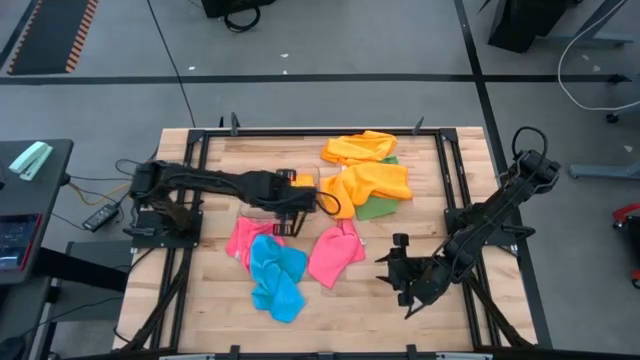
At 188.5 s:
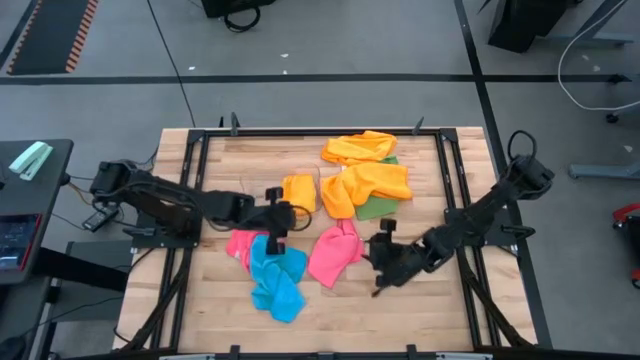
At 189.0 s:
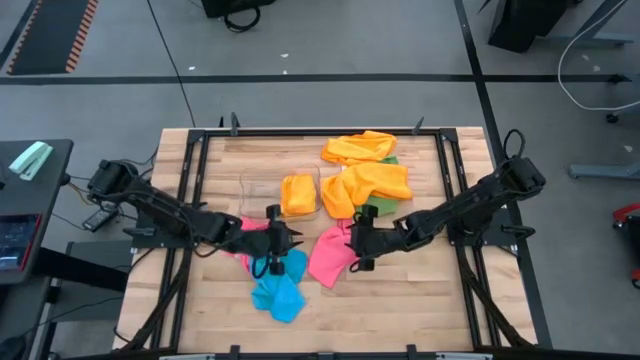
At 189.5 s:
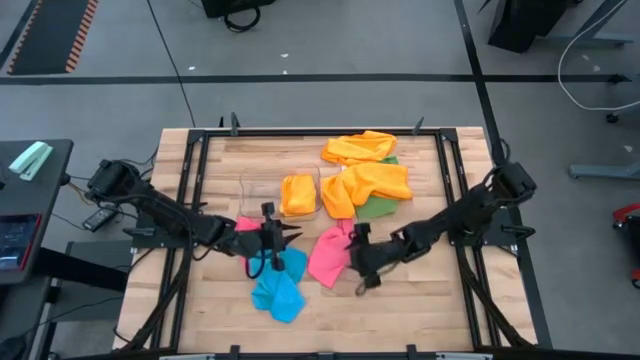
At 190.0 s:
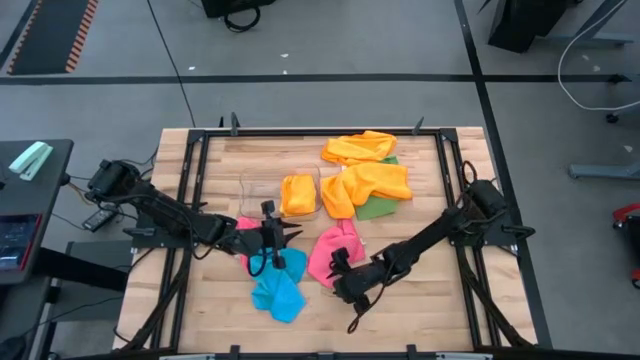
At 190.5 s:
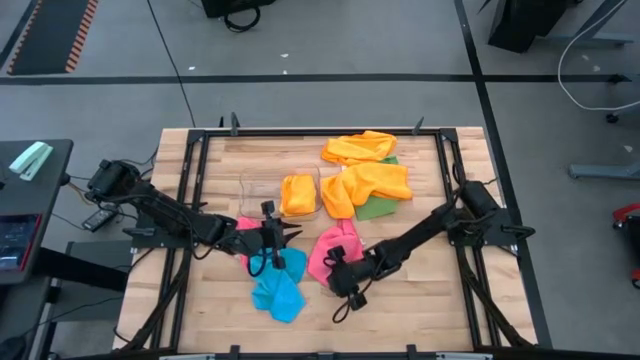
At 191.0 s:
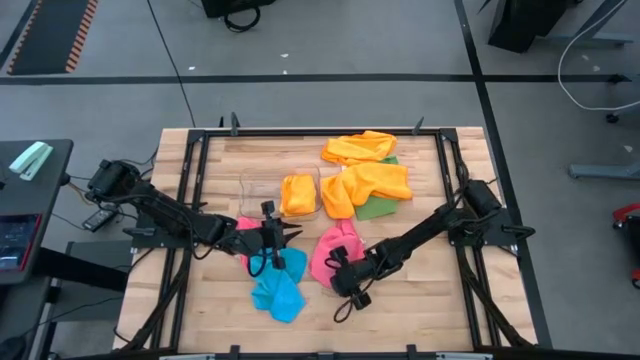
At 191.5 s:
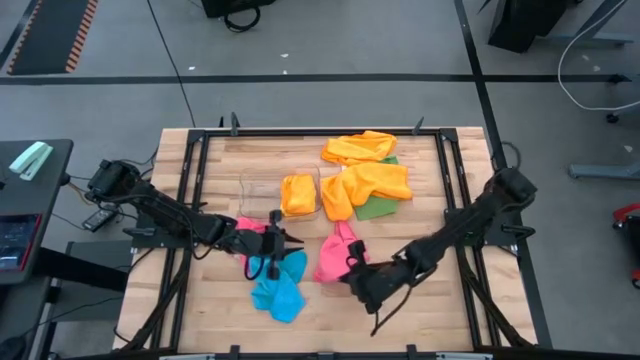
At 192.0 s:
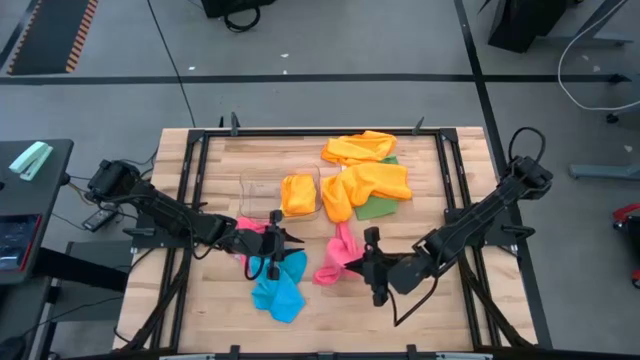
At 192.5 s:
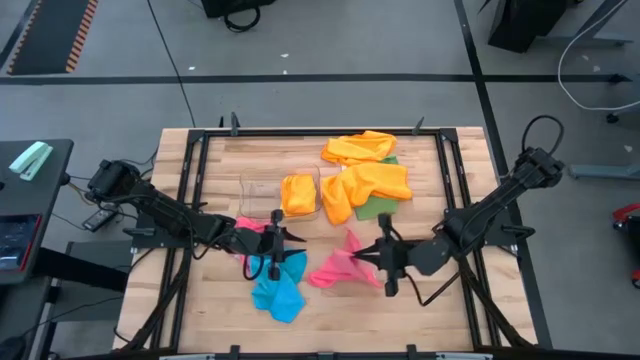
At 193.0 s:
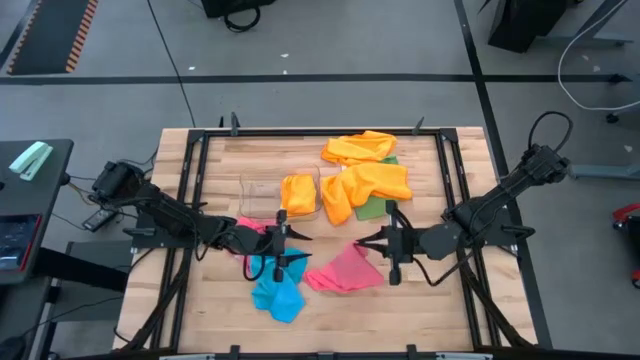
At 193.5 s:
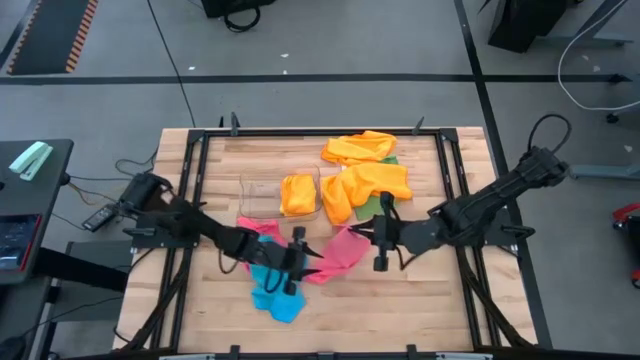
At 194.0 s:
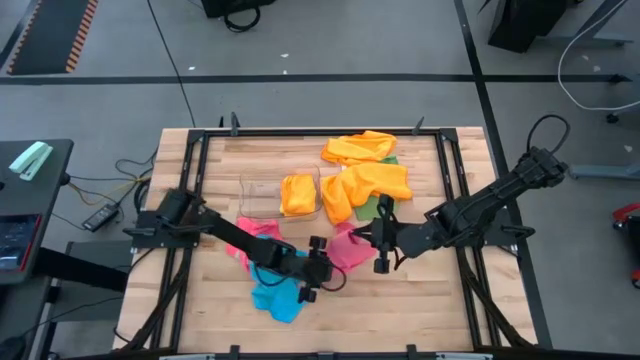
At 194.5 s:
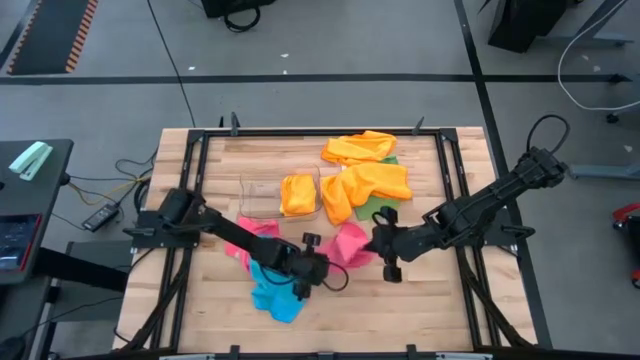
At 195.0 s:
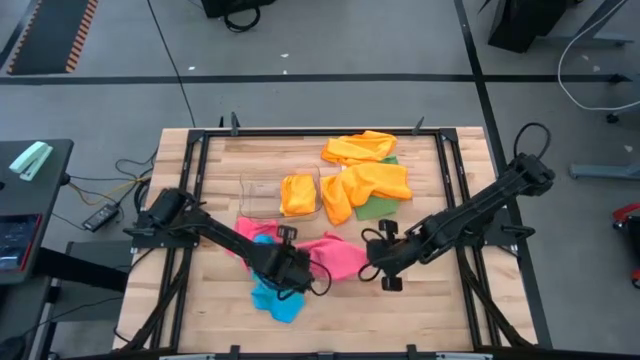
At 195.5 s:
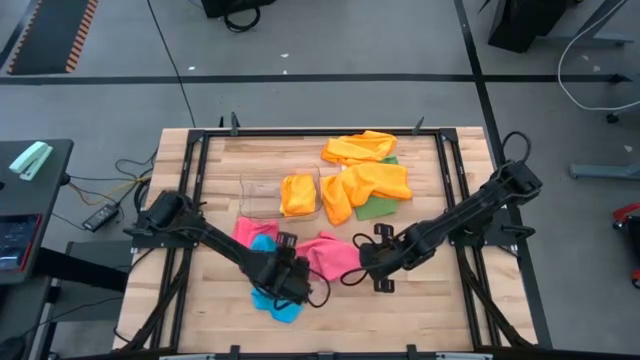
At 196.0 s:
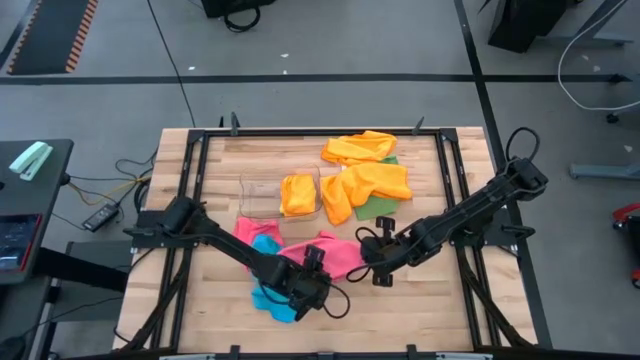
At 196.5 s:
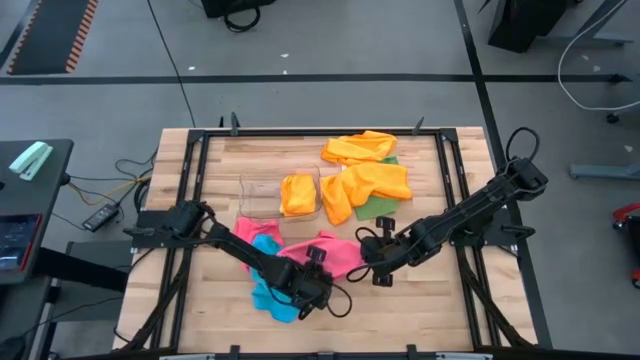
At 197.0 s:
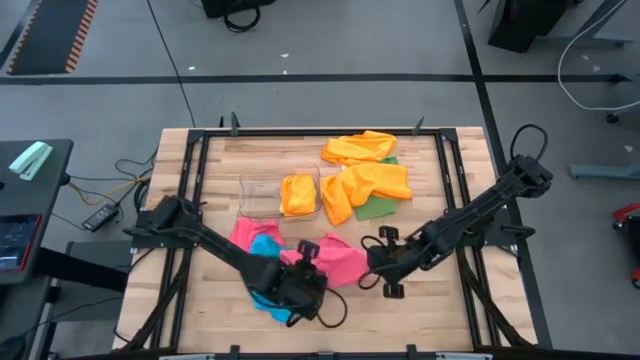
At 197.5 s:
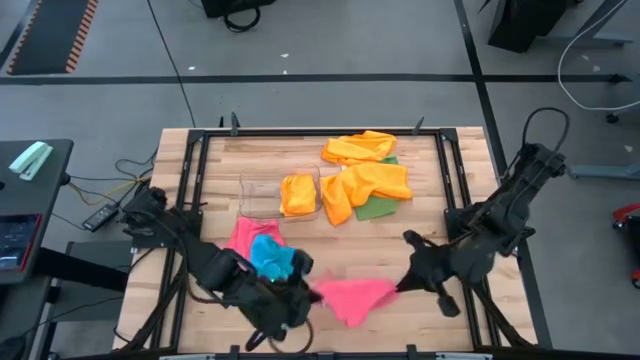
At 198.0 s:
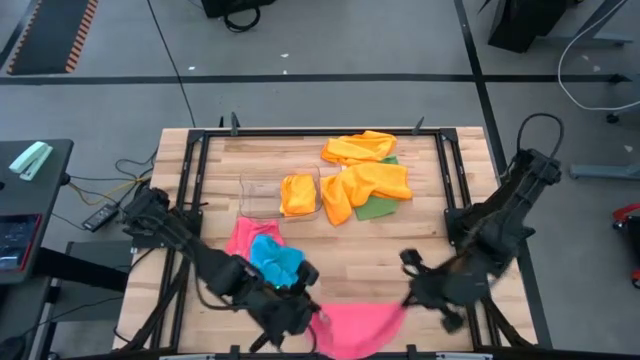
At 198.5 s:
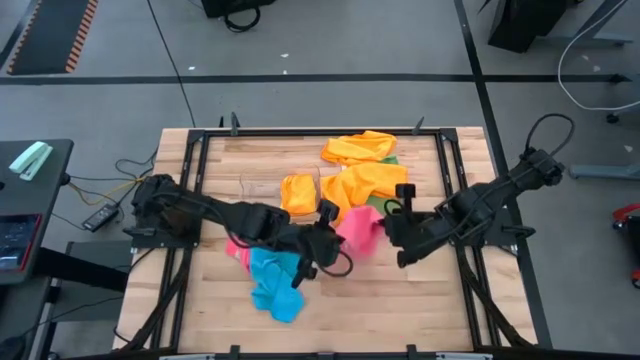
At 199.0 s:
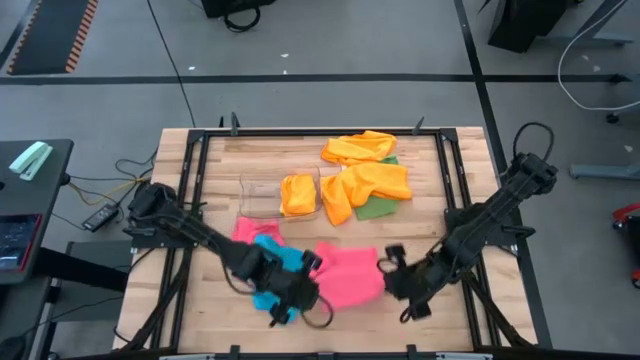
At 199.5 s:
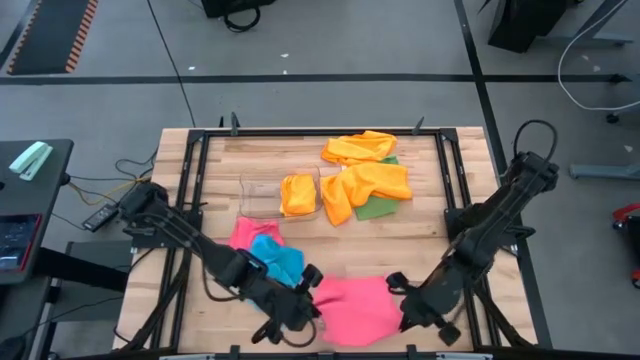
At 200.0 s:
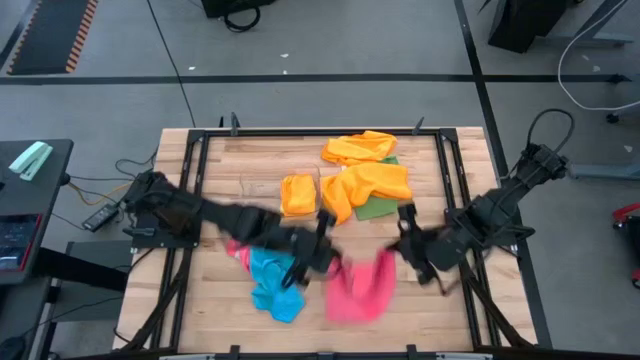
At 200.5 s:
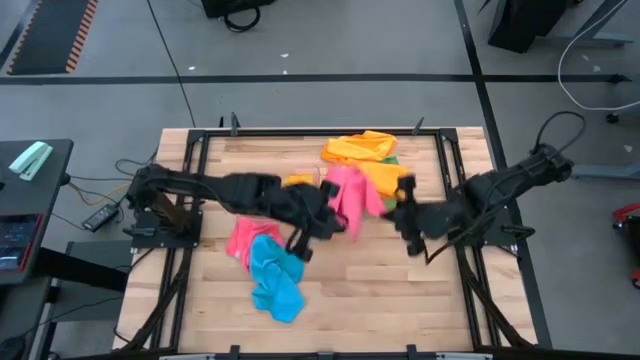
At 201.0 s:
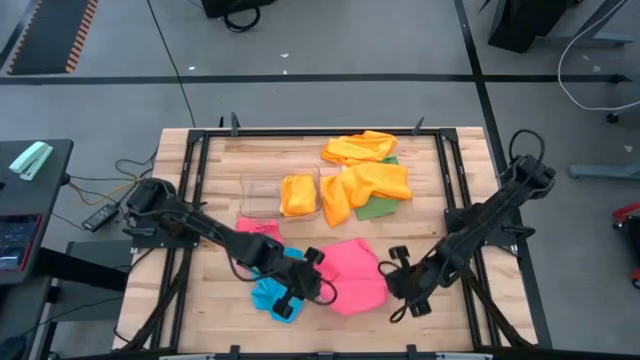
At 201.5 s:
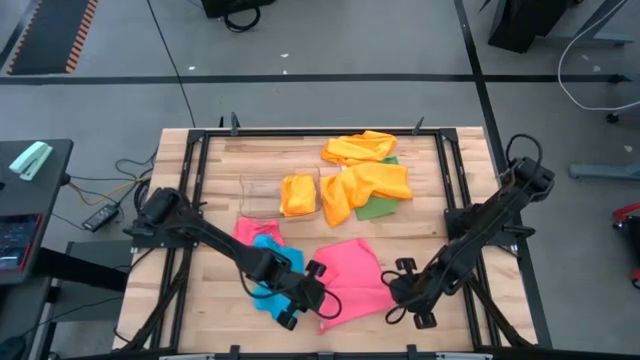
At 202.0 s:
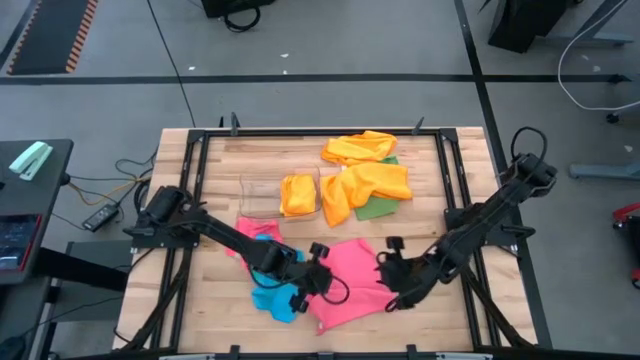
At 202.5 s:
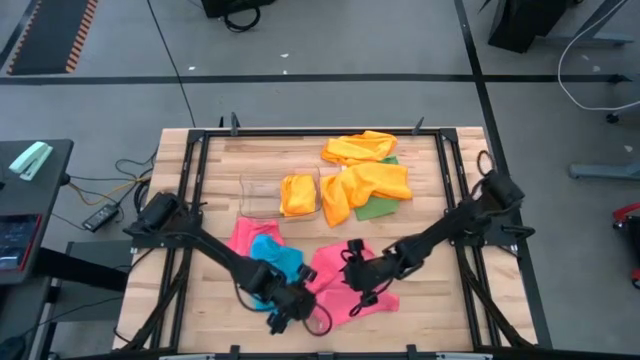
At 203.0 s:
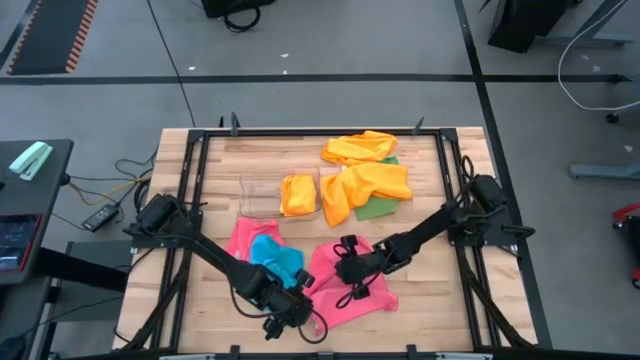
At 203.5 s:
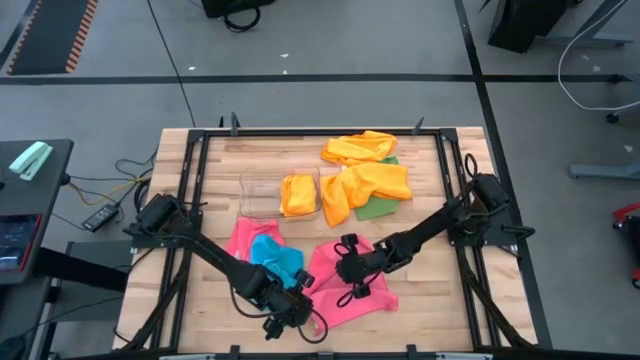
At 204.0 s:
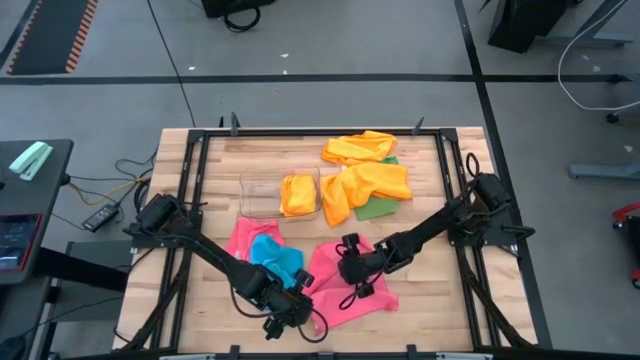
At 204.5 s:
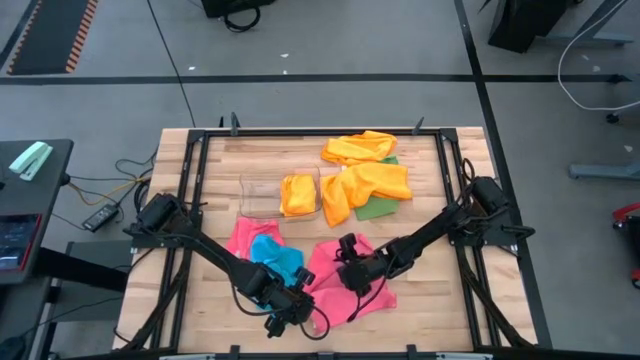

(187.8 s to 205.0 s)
Task: Fold microfiber towels
Fold the right pink microfiber cloth
